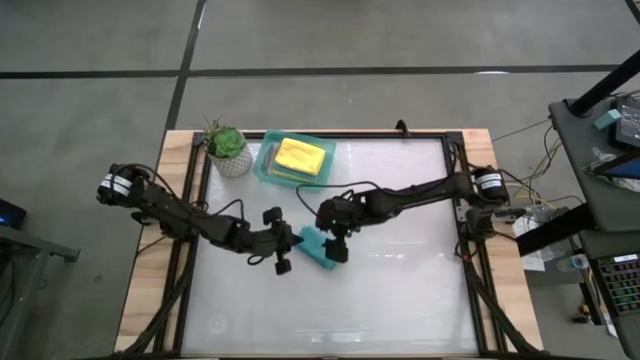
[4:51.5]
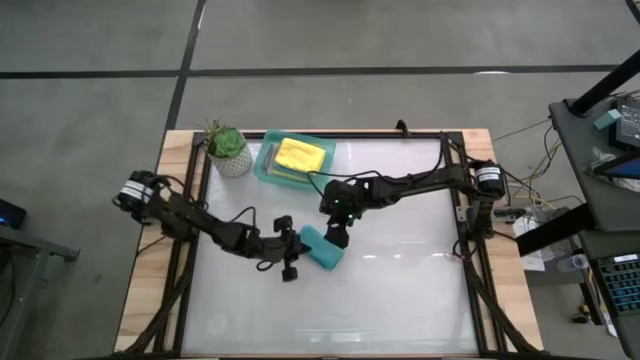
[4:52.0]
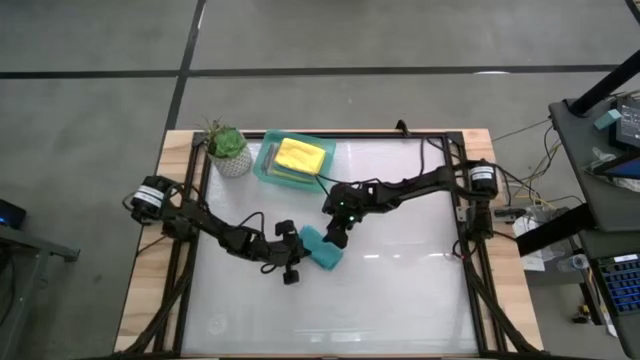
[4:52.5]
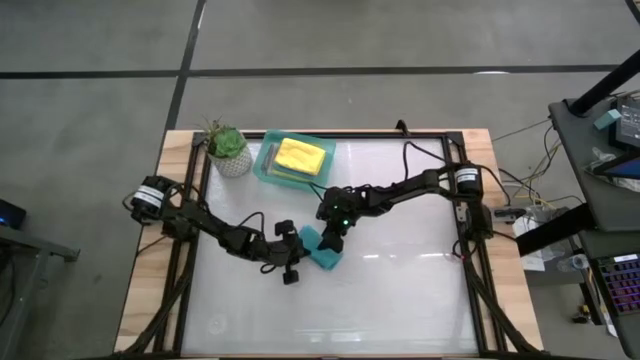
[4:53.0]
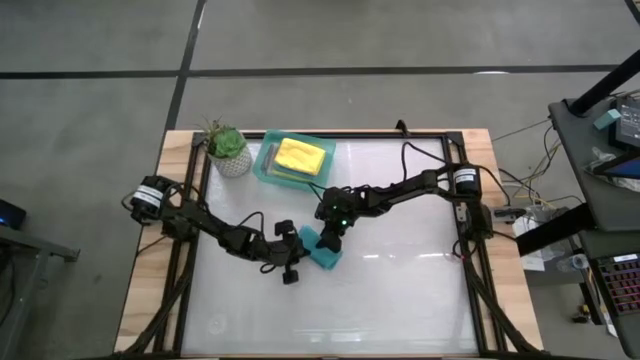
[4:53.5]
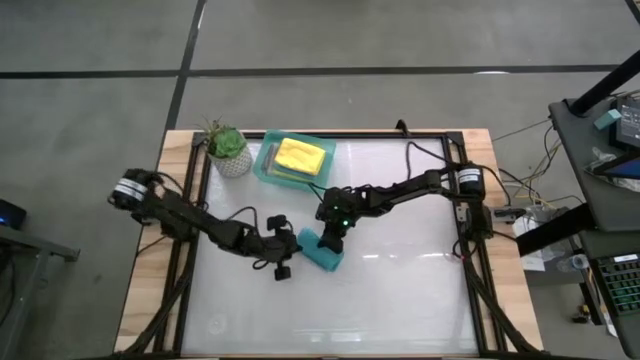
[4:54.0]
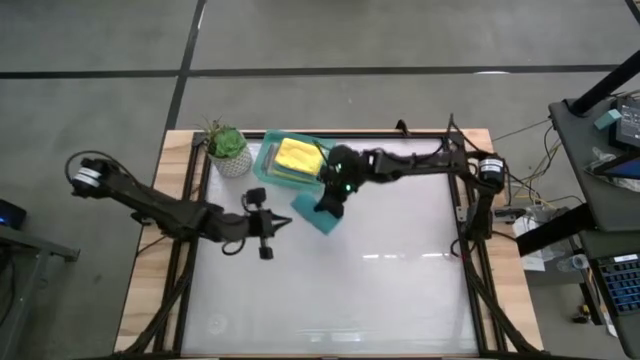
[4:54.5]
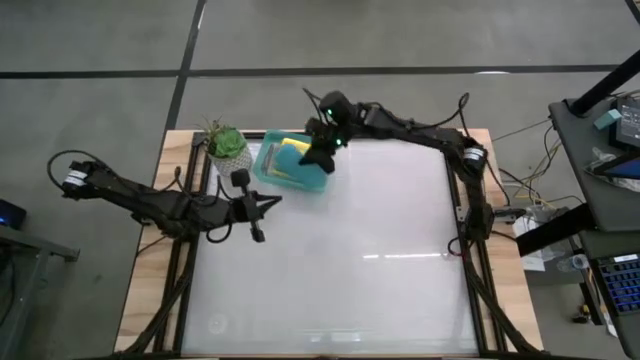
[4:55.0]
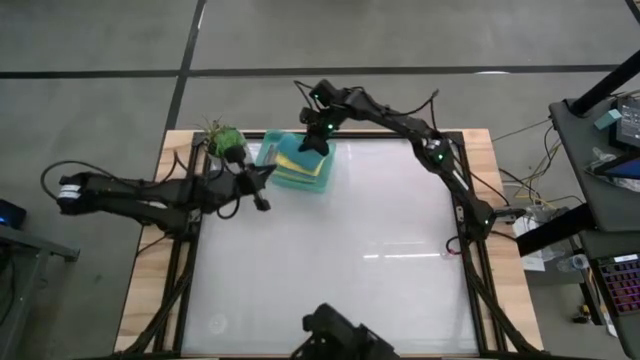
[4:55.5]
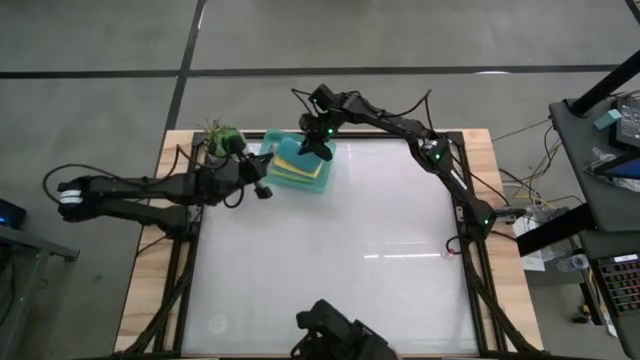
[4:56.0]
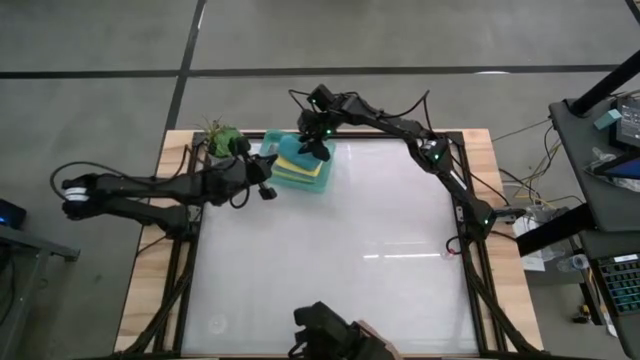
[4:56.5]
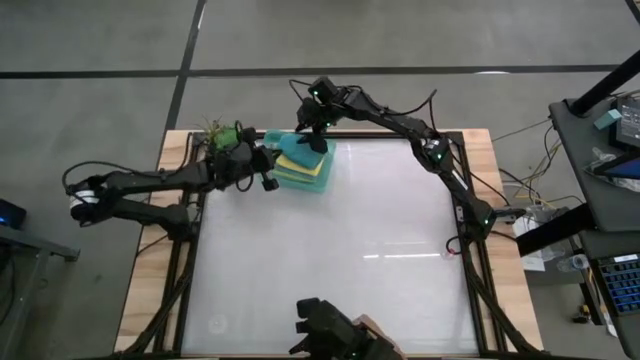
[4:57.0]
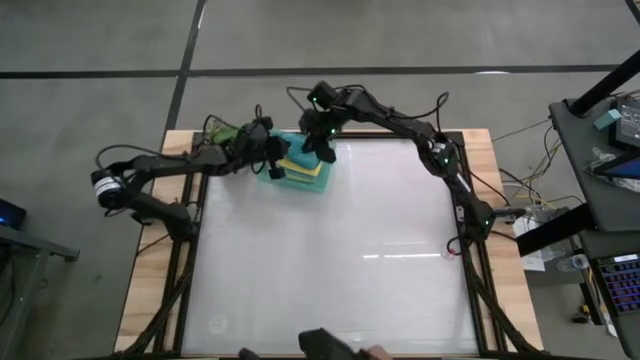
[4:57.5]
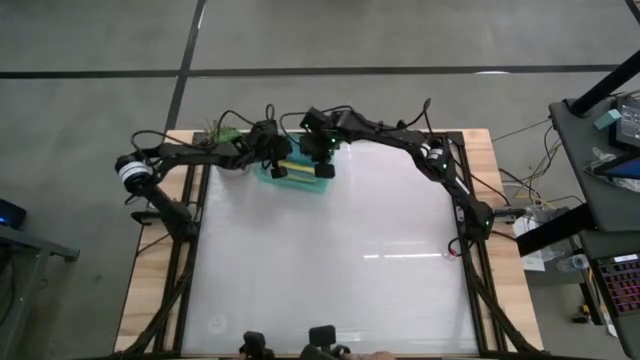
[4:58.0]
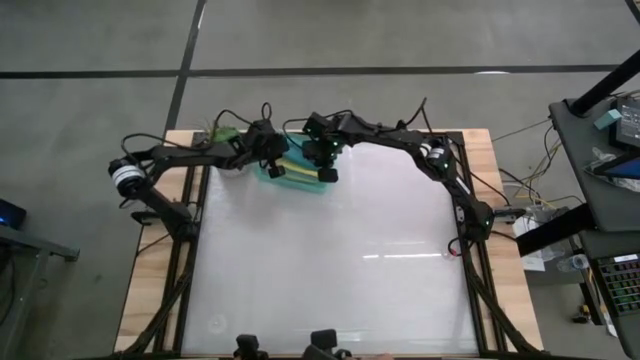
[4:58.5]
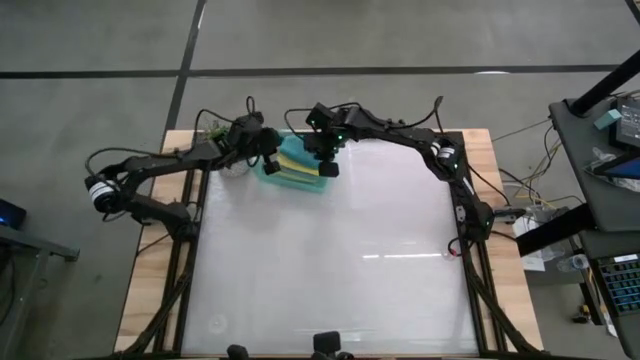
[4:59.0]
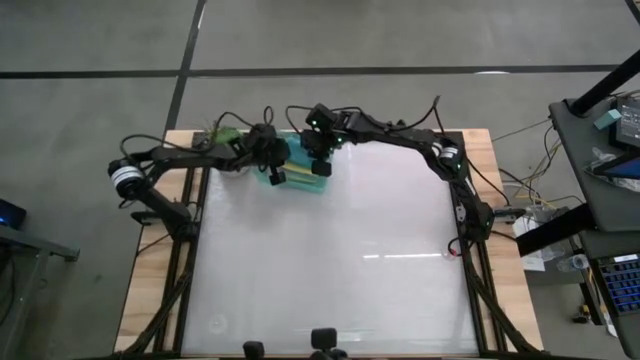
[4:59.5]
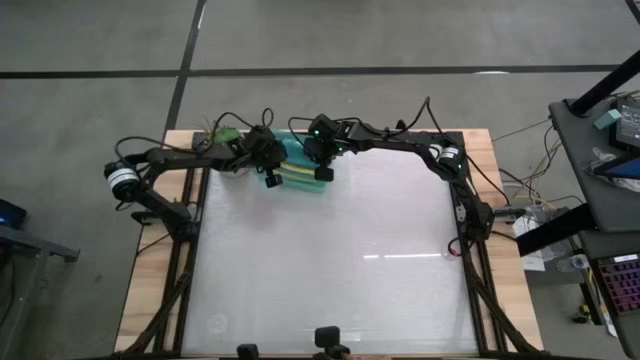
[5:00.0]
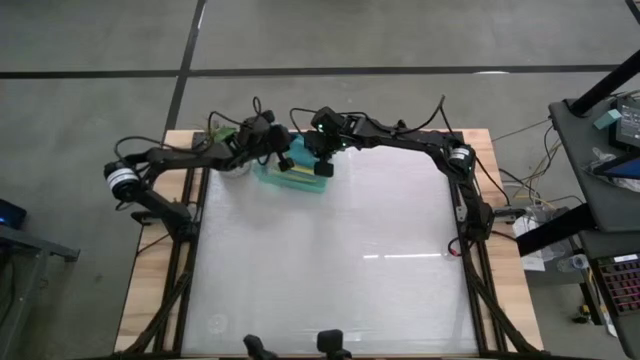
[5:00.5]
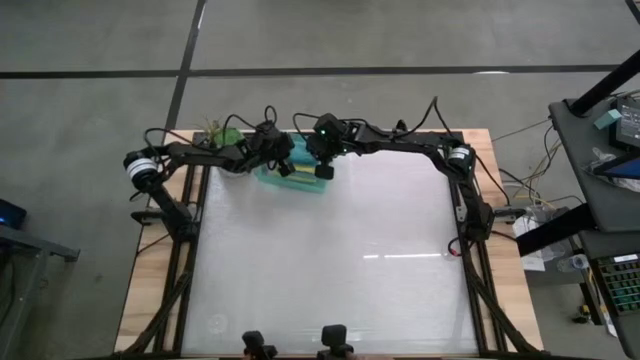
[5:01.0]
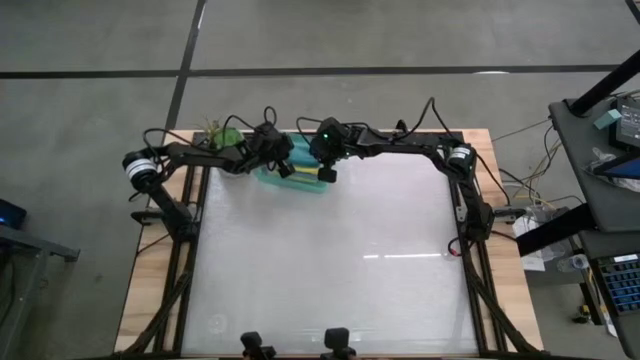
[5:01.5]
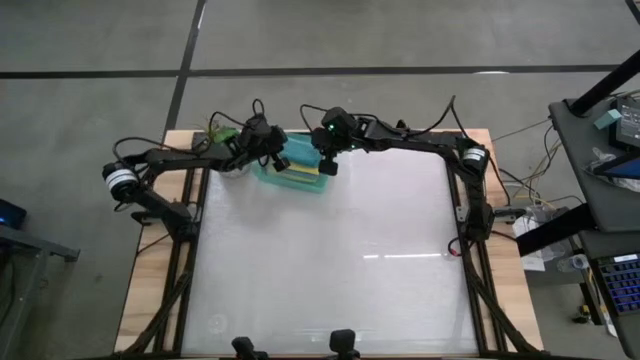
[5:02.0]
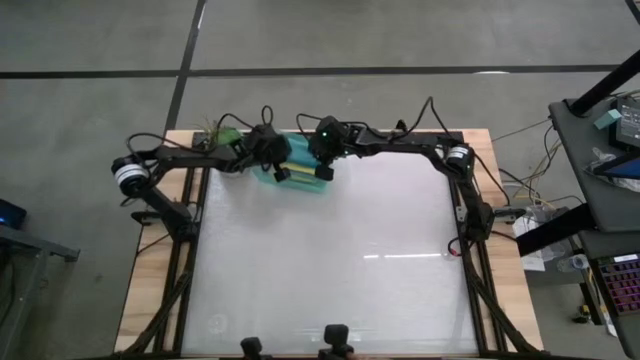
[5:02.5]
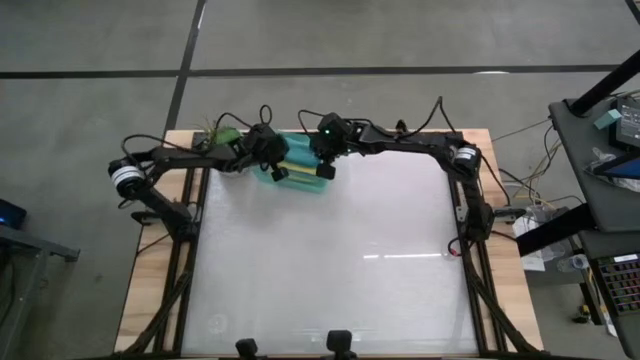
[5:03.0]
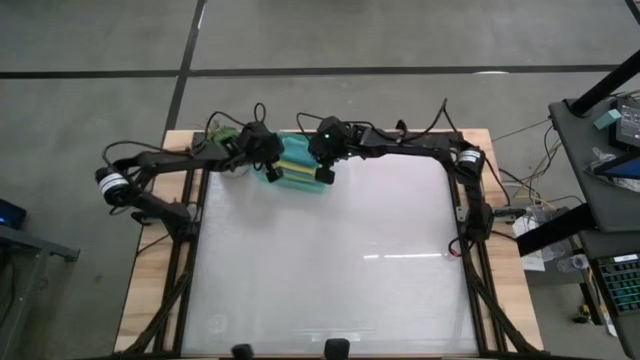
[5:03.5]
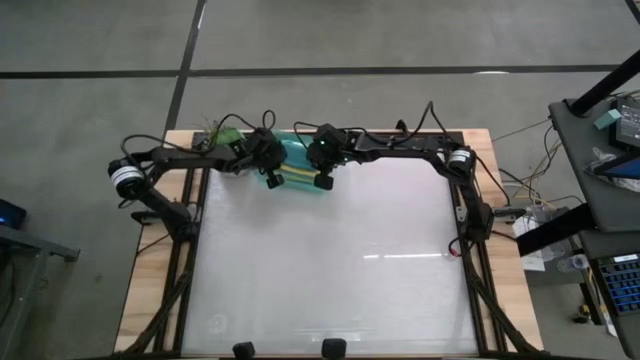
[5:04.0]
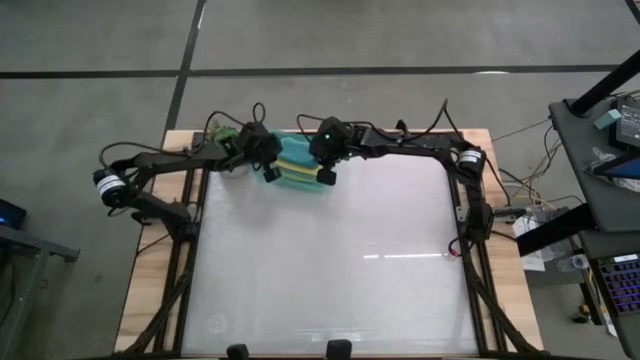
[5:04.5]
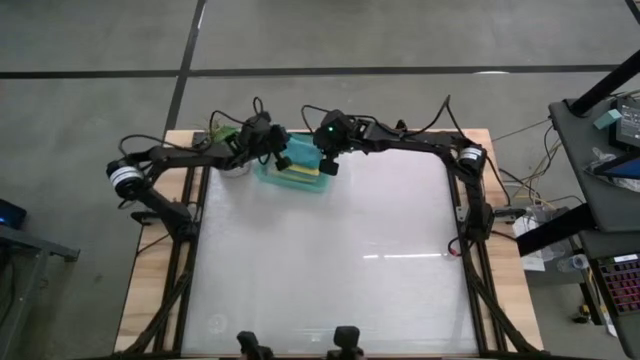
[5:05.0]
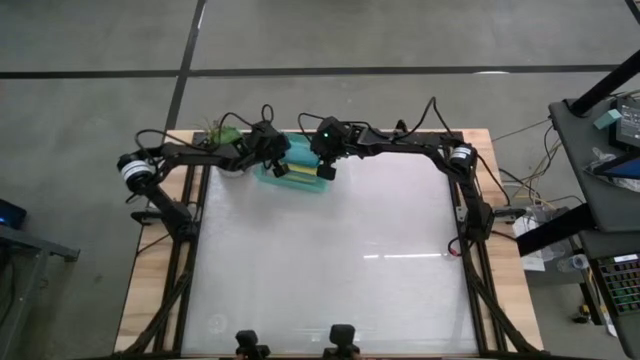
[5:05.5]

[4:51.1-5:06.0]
Task: Fold microfiber towels
Put the blue microfiber towel into the bin

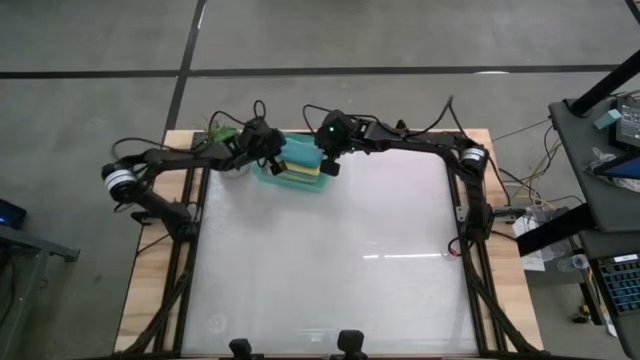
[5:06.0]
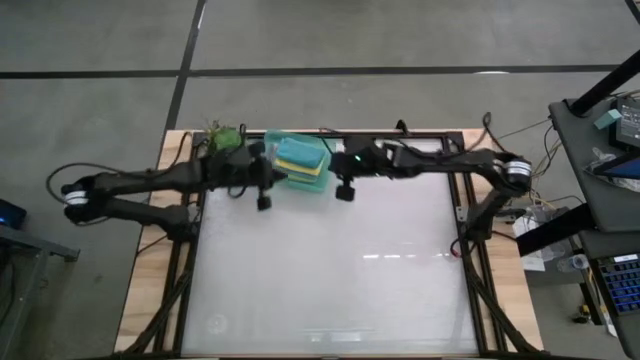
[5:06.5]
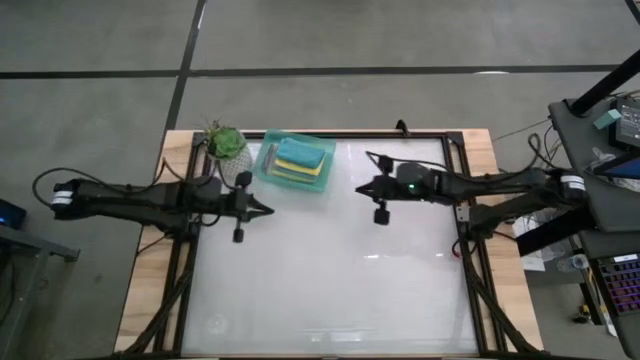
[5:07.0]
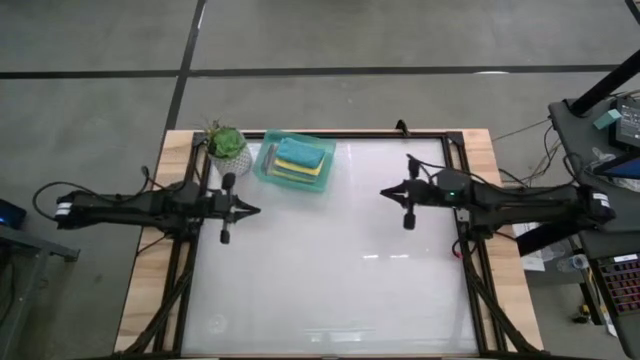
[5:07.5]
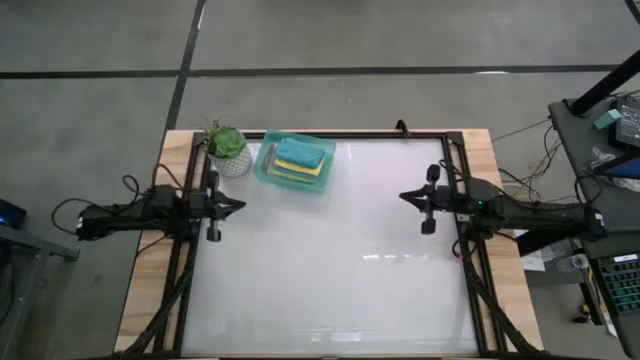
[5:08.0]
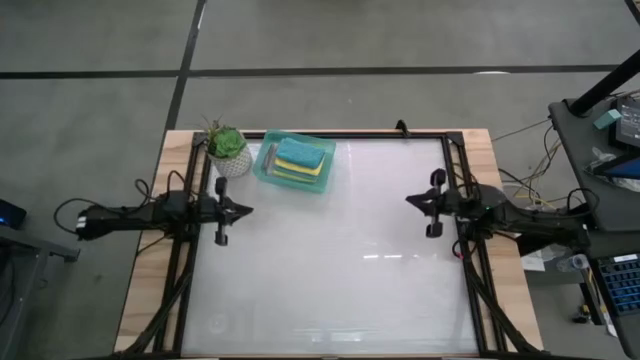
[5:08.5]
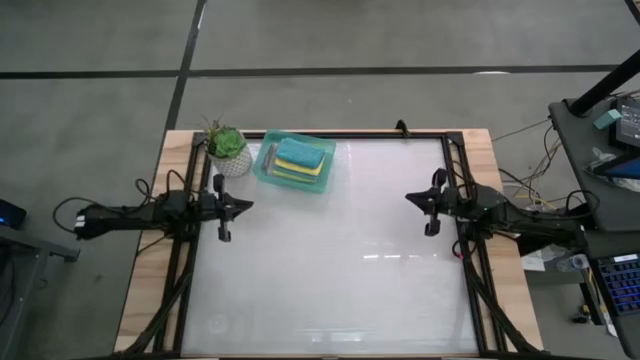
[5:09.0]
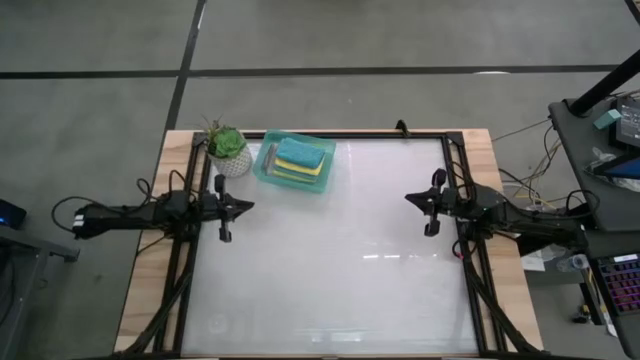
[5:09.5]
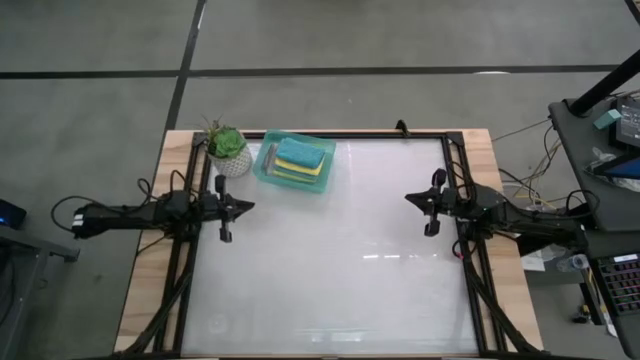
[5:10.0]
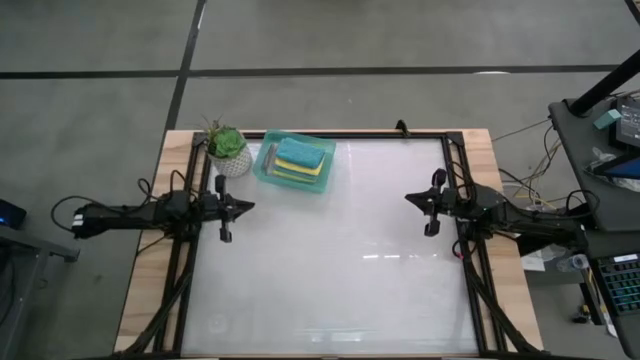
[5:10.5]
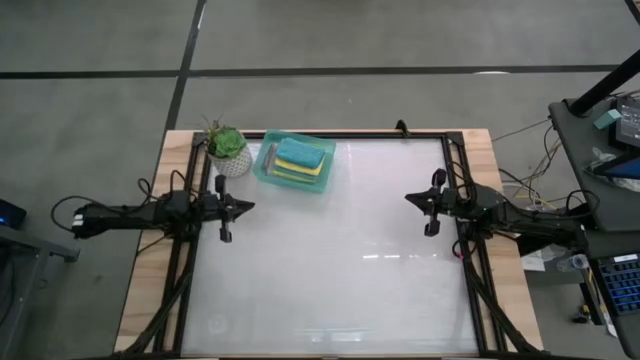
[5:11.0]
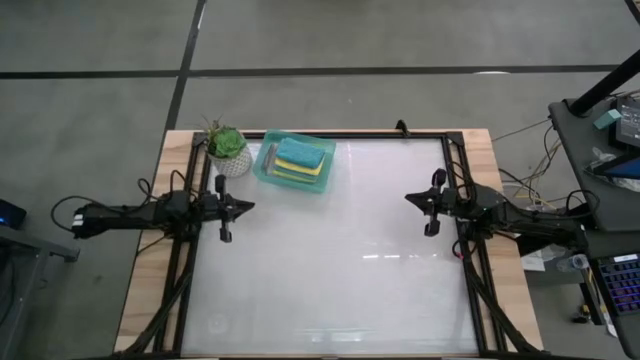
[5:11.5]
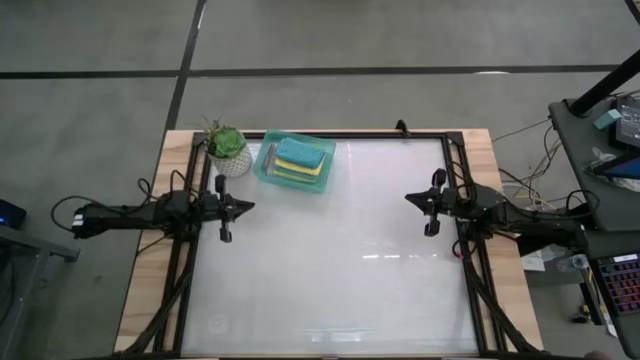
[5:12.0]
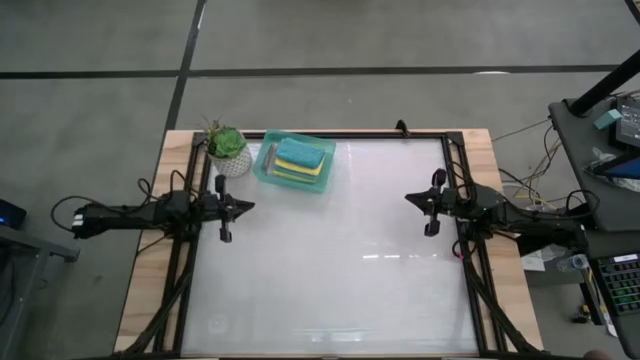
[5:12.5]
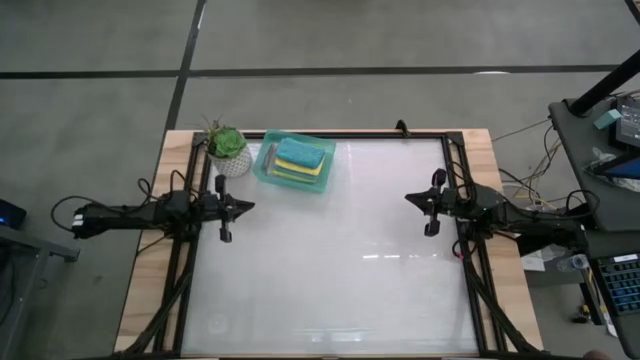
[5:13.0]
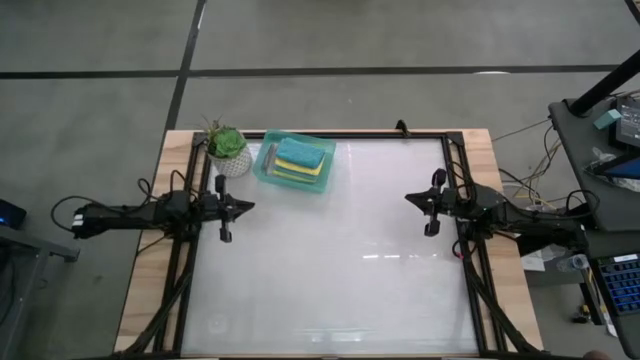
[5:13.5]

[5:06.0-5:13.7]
Return to Home Position
